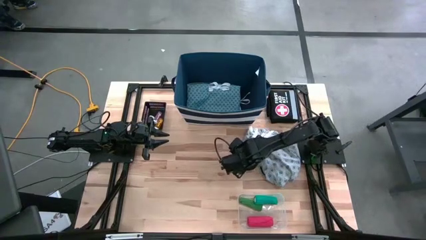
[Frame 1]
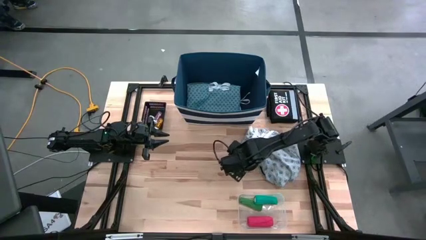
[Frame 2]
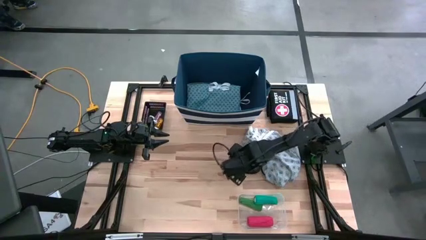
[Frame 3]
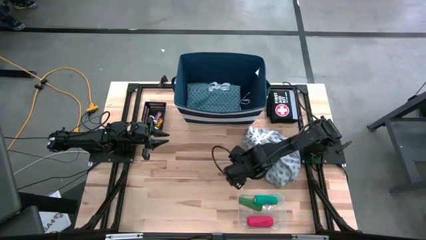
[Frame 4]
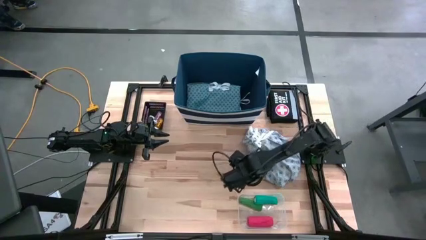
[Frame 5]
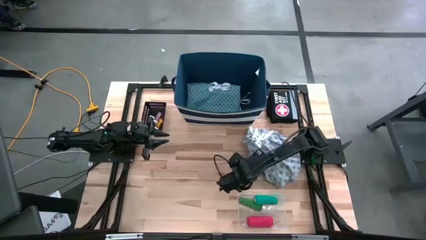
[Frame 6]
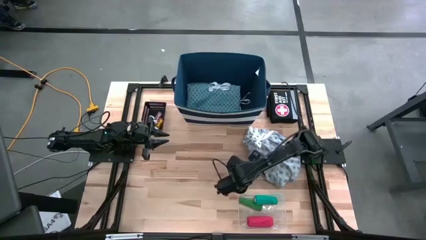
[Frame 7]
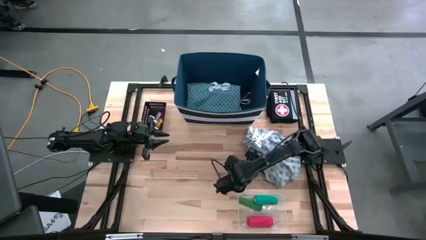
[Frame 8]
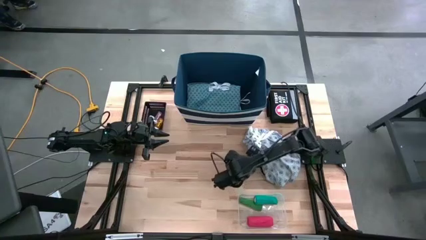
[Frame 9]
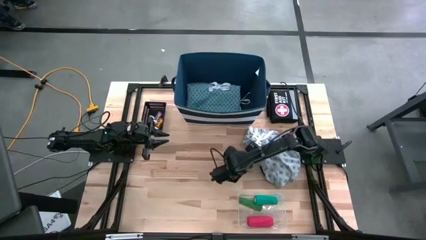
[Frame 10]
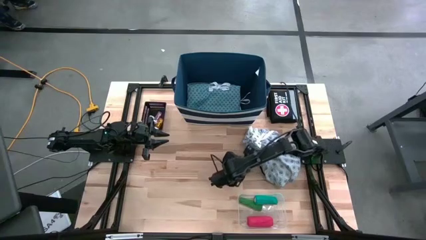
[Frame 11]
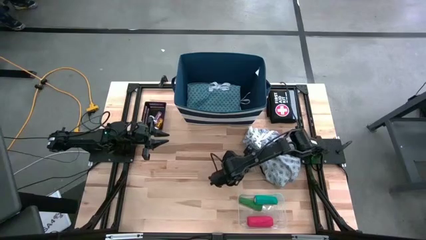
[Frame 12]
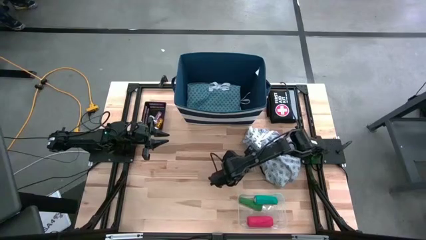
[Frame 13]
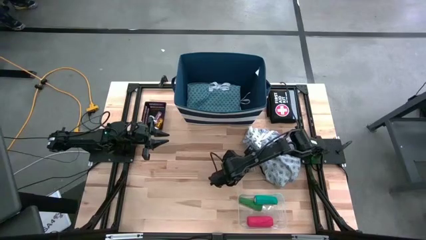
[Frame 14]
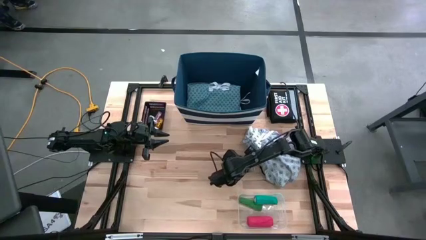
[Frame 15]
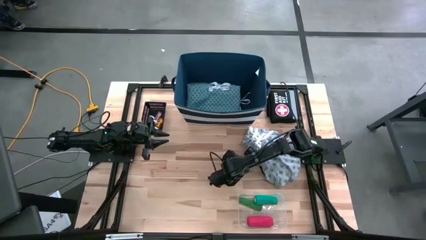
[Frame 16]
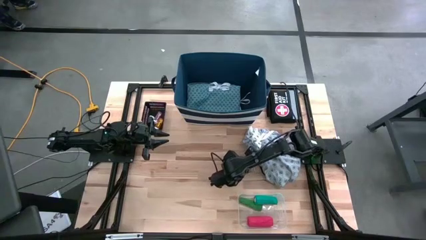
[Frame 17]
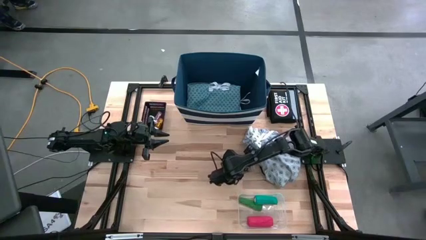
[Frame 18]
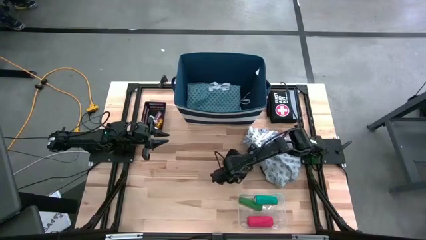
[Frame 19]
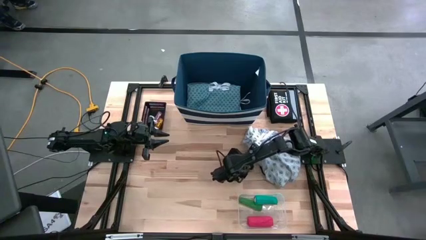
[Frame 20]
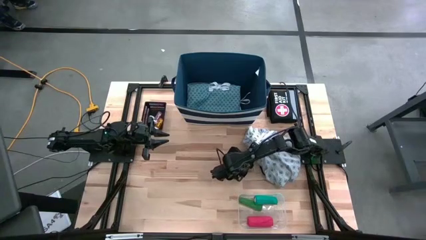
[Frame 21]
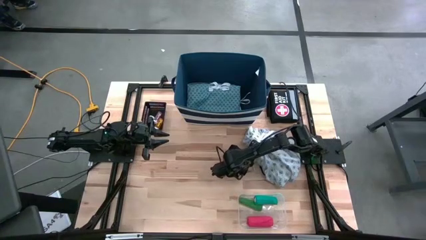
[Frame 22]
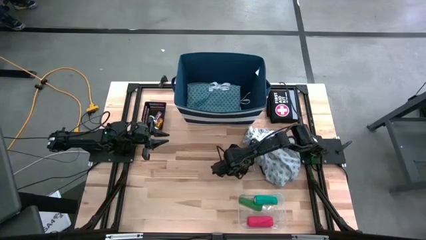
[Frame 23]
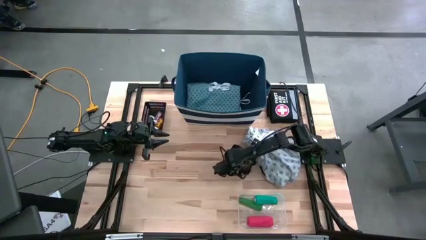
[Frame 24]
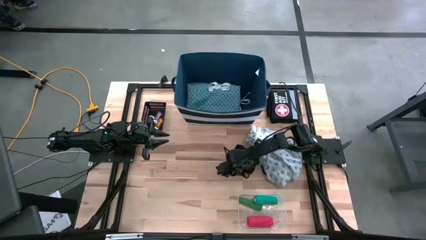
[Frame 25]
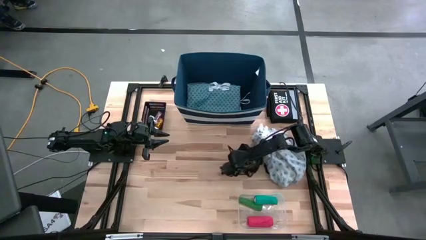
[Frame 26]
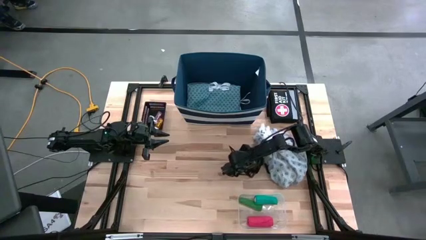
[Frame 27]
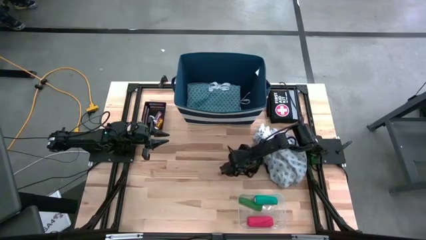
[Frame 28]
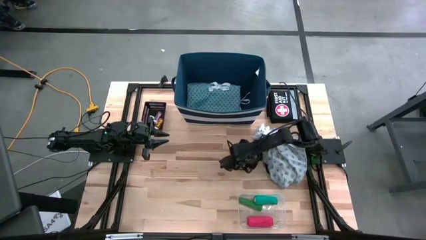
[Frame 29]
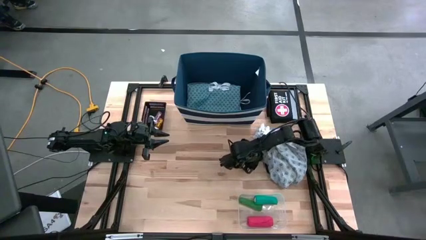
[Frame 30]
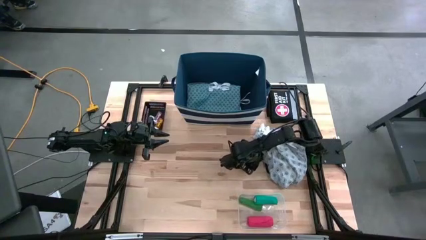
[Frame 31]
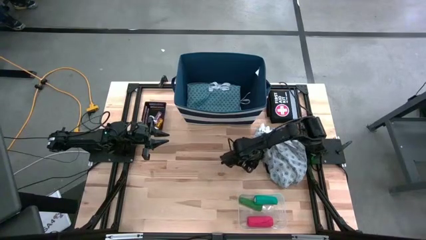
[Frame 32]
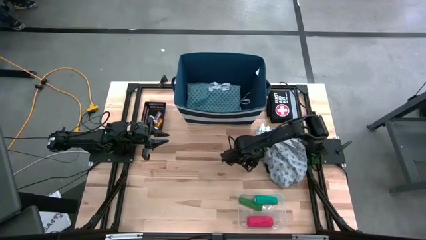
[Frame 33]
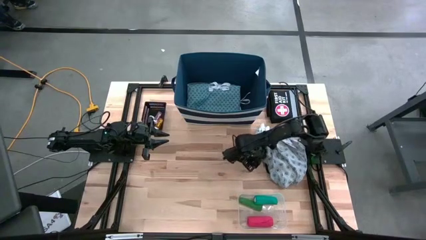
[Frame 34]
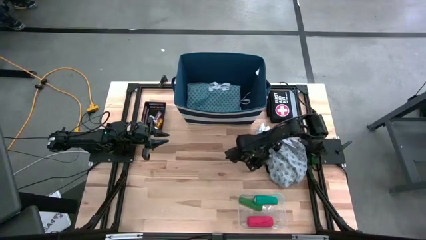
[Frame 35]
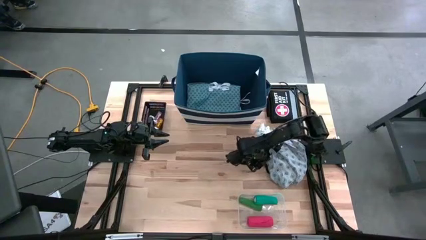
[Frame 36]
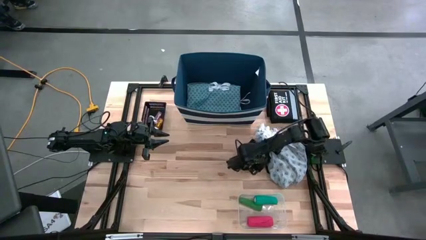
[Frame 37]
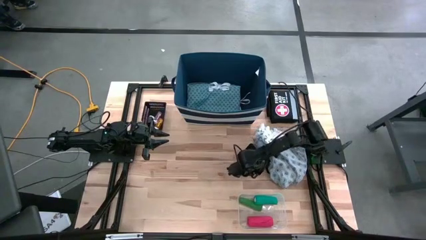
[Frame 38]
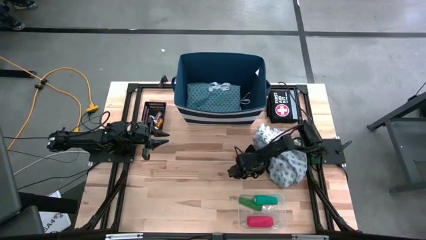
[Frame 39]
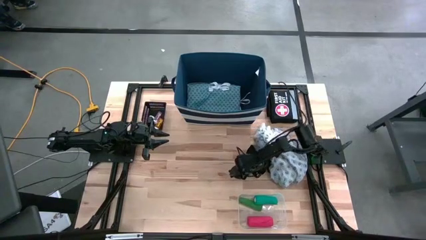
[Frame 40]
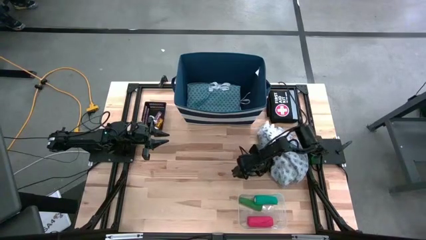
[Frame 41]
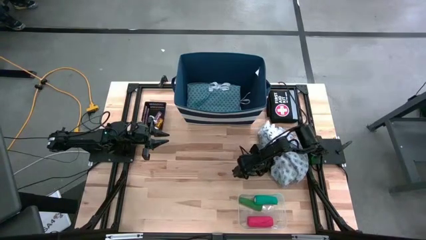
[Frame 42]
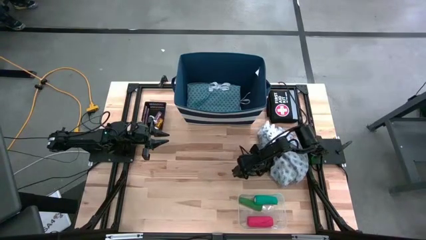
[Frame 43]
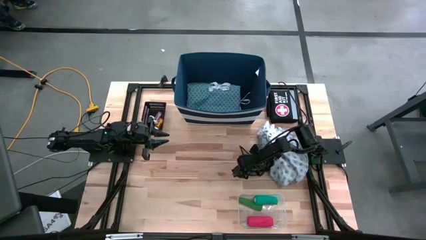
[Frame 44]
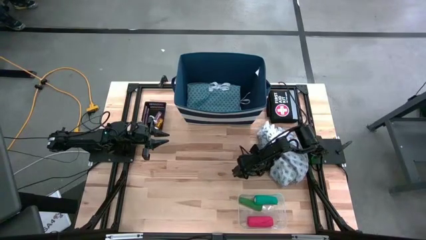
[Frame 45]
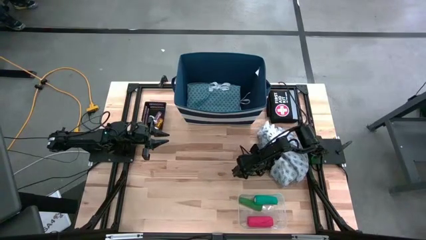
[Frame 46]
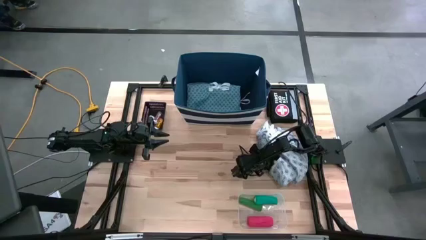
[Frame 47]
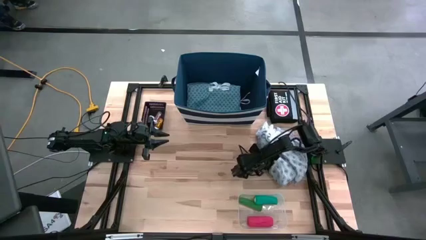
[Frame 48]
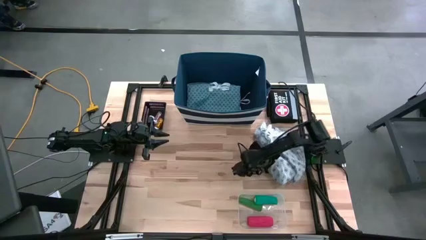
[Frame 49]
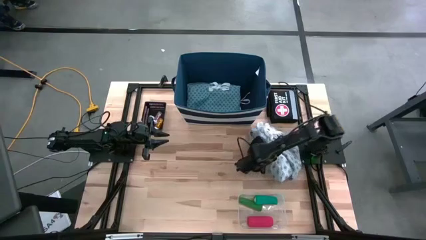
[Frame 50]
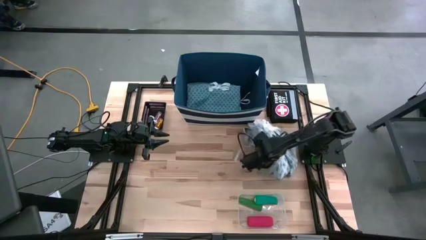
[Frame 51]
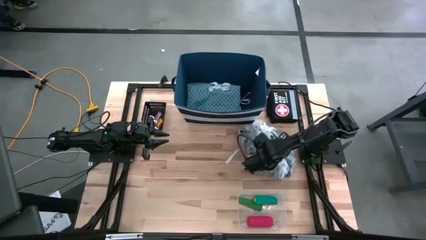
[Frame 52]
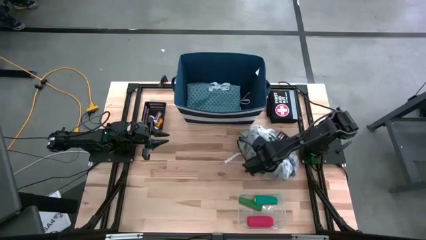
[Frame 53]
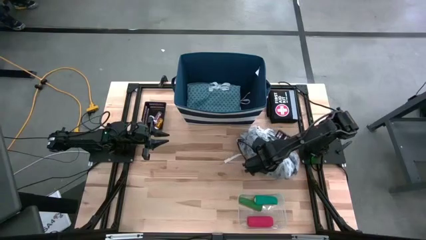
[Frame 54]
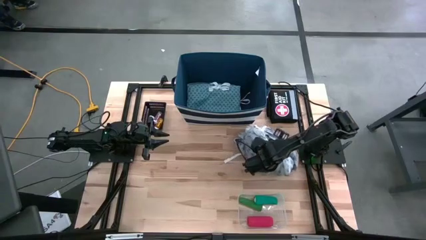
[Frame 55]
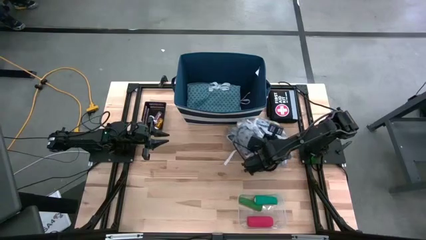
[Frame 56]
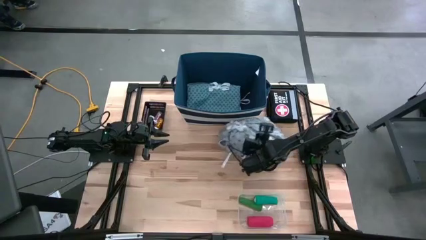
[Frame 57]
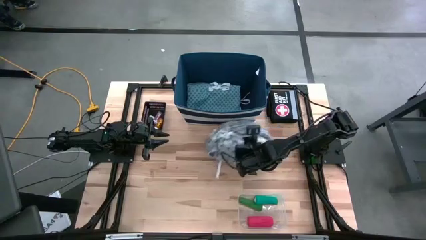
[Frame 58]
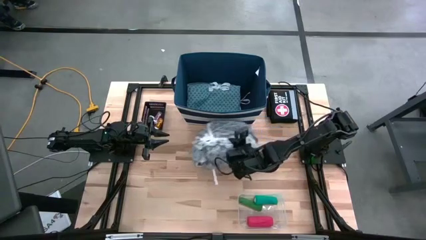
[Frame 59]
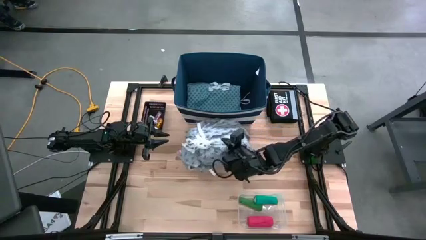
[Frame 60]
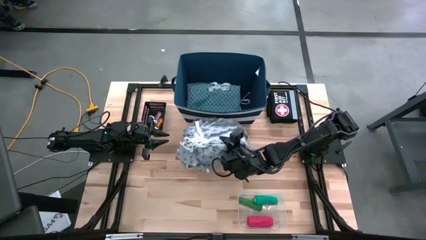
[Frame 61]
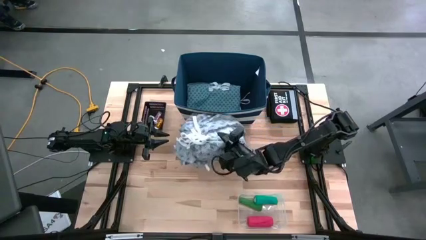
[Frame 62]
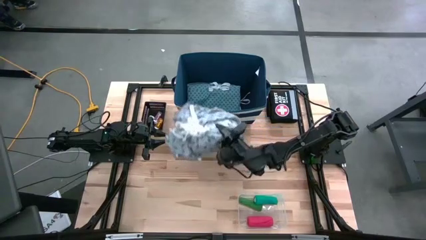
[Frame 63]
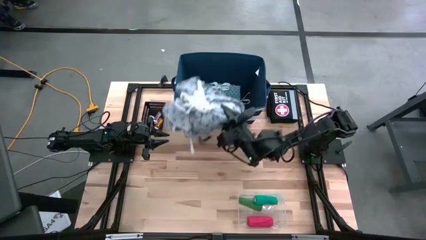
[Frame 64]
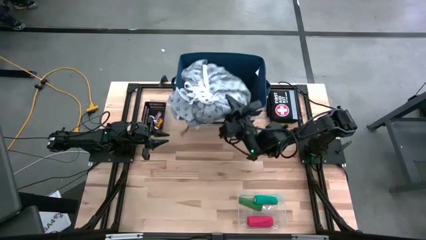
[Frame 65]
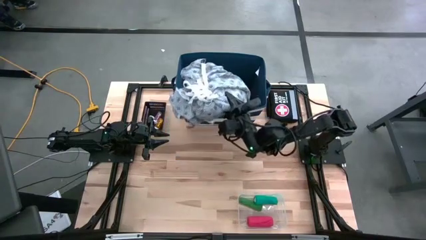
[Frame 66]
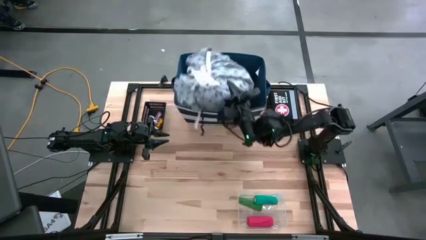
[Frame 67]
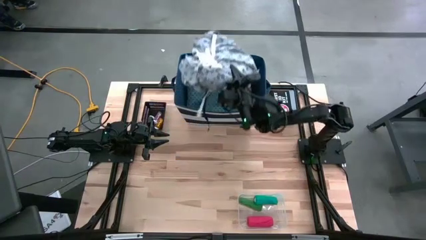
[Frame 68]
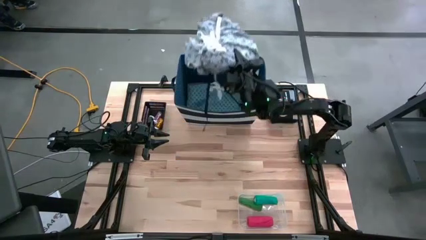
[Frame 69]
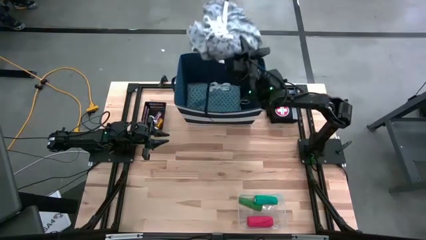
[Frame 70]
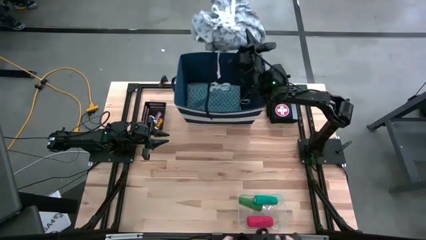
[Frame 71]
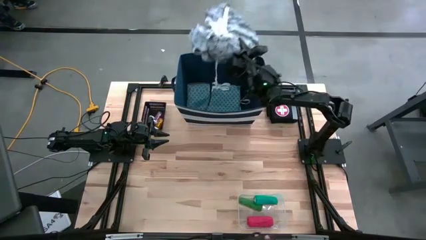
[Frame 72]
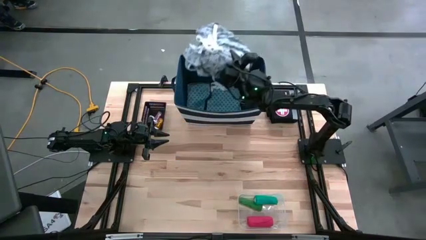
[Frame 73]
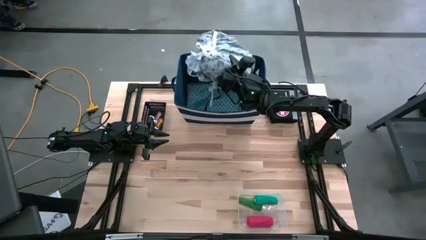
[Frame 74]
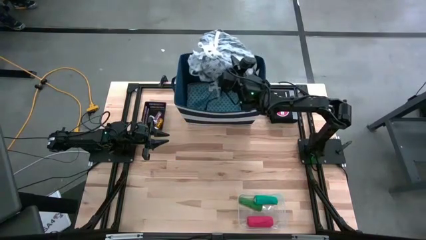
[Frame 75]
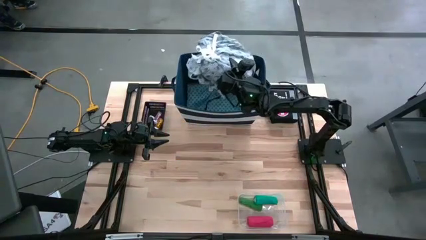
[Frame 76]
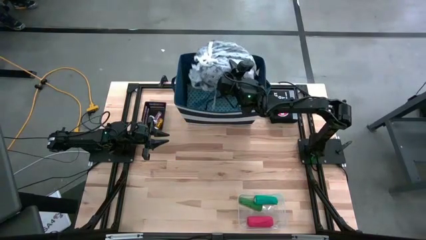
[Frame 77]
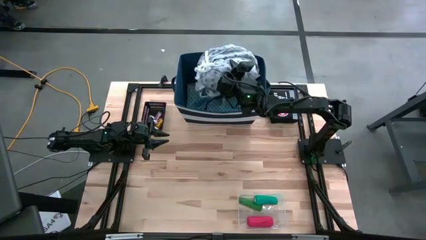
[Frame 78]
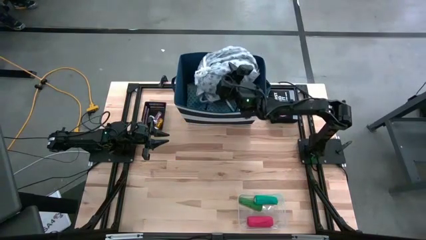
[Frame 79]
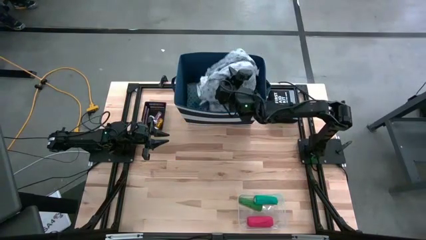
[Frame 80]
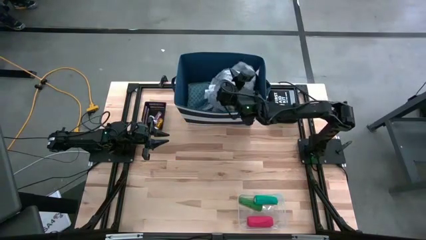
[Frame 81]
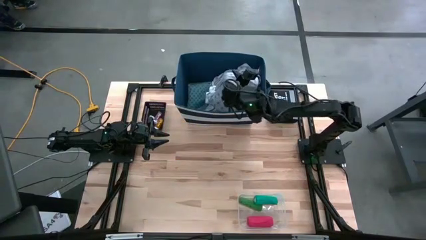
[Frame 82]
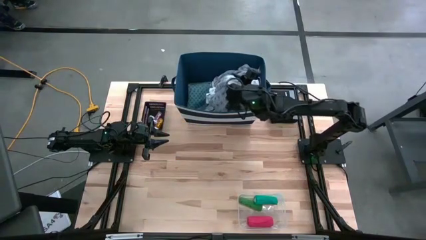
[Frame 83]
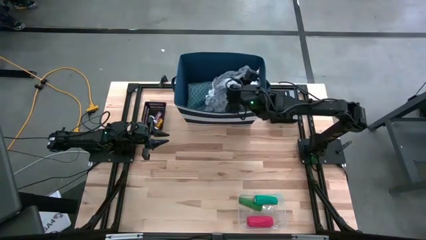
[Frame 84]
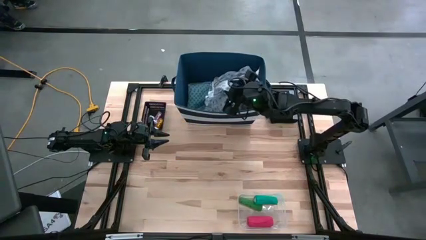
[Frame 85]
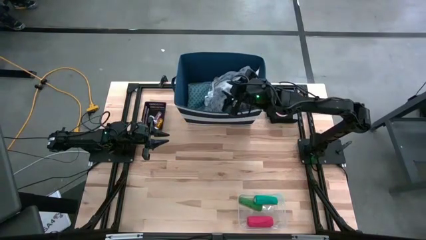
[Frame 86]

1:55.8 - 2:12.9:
Task: Pick & Place Medicine items
Put the grey patient gown into the laundry bin
